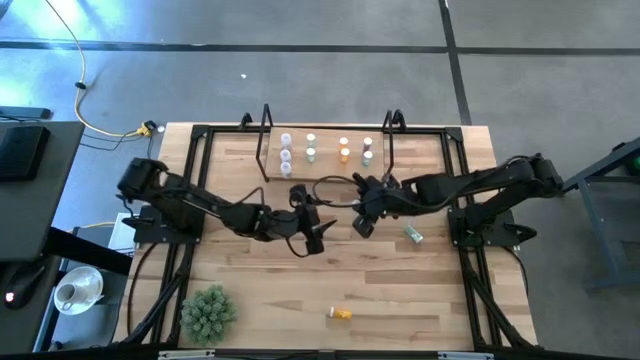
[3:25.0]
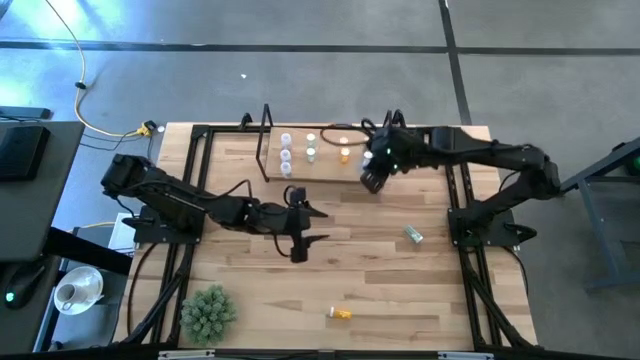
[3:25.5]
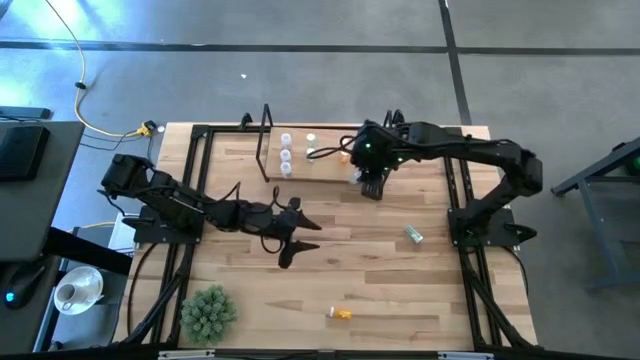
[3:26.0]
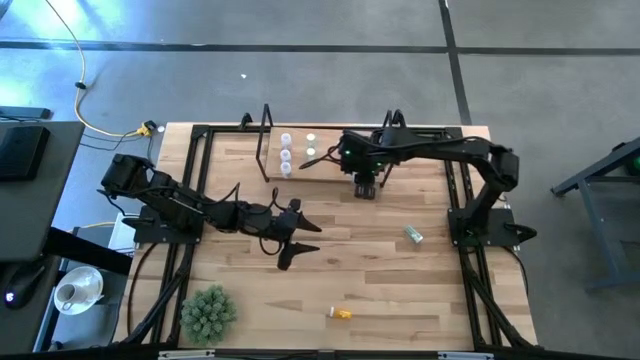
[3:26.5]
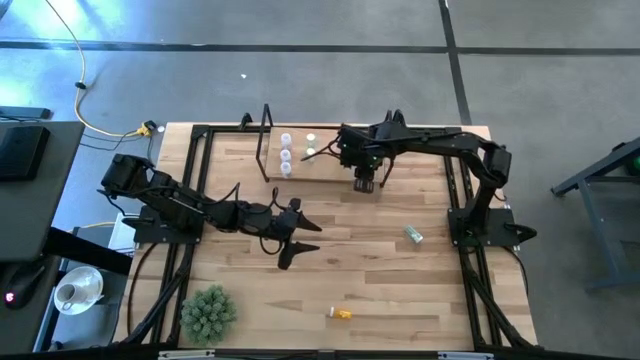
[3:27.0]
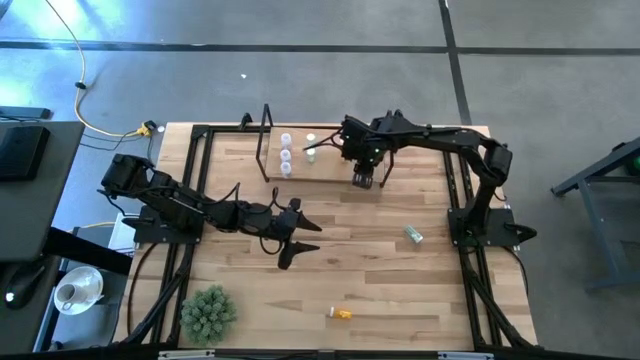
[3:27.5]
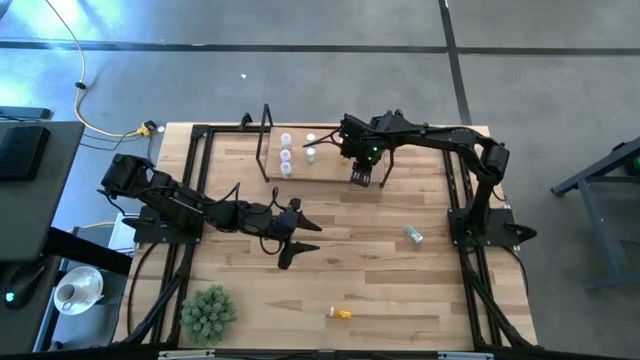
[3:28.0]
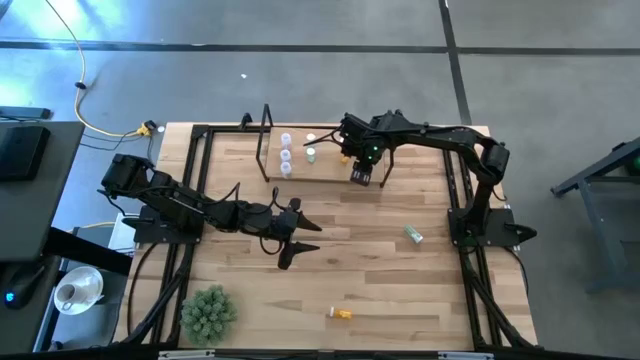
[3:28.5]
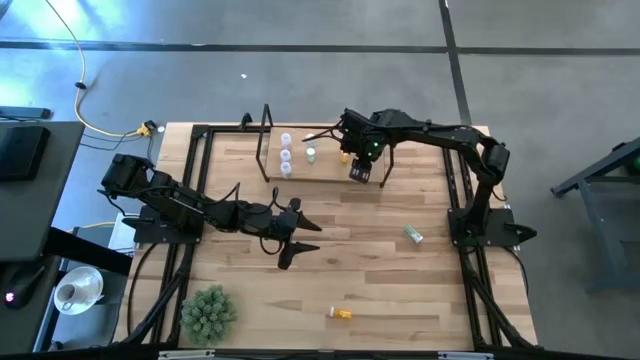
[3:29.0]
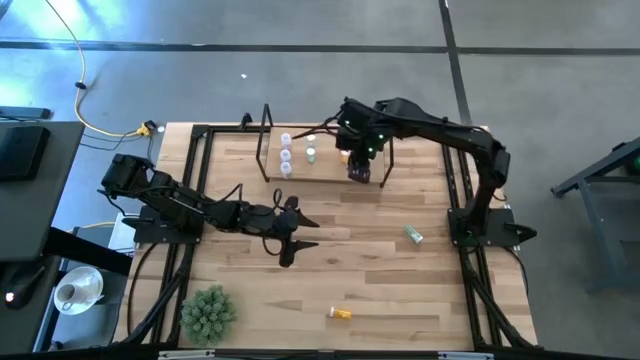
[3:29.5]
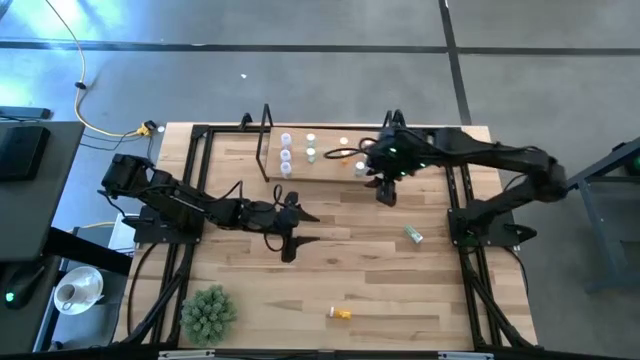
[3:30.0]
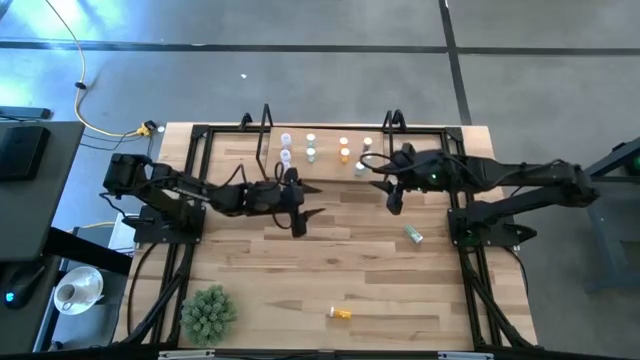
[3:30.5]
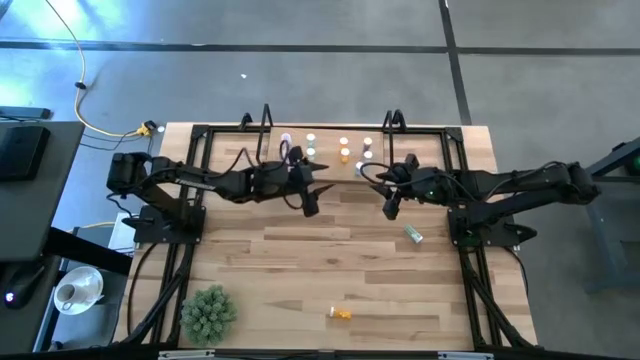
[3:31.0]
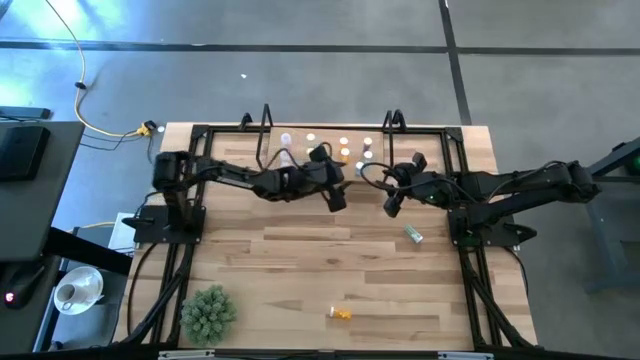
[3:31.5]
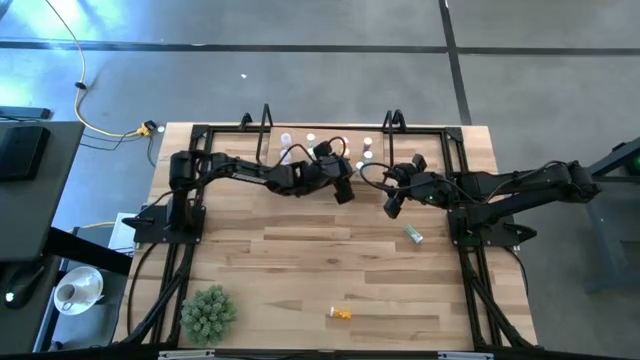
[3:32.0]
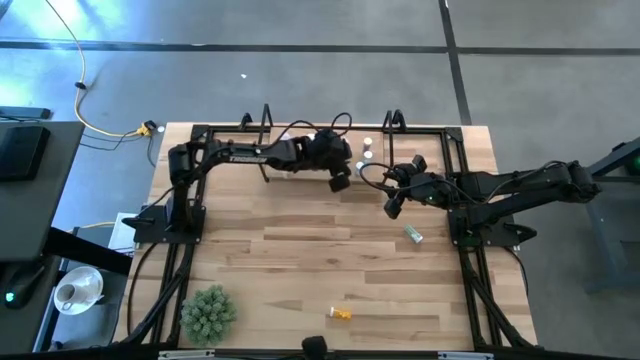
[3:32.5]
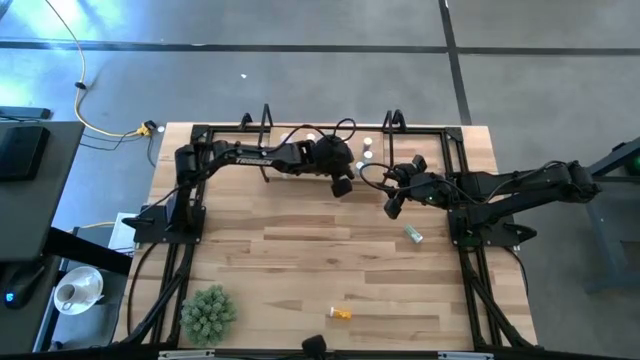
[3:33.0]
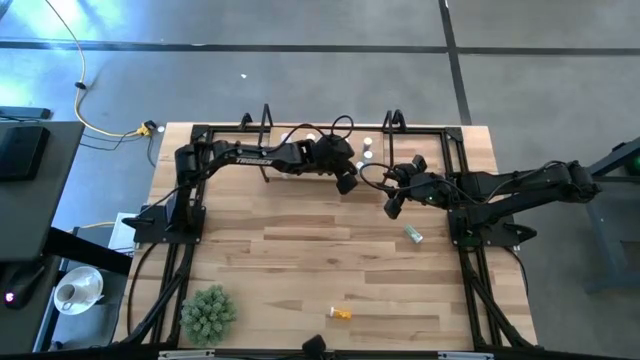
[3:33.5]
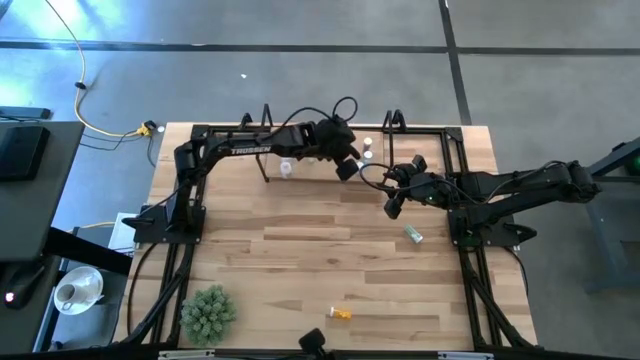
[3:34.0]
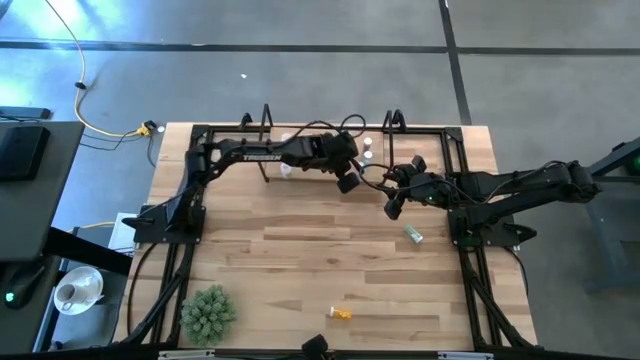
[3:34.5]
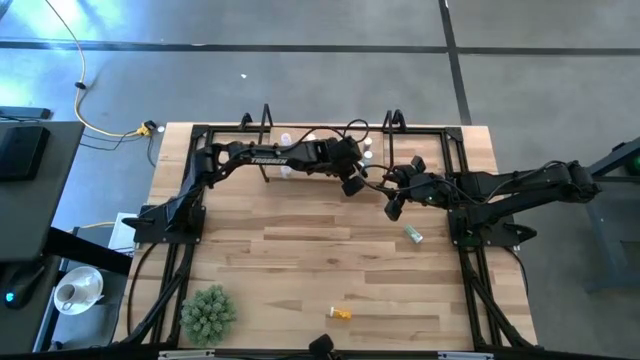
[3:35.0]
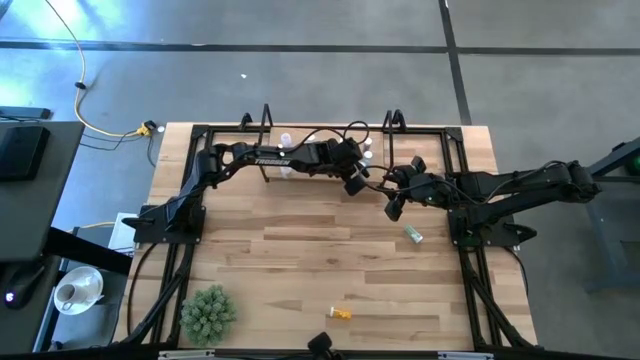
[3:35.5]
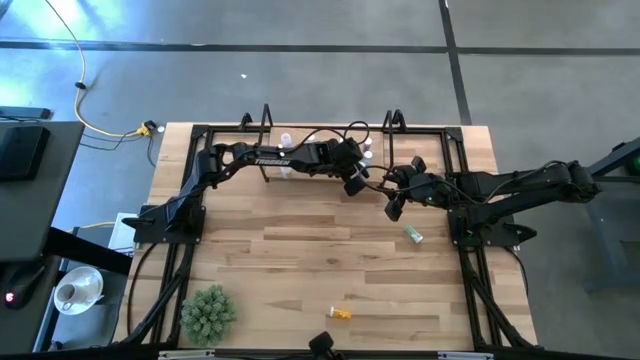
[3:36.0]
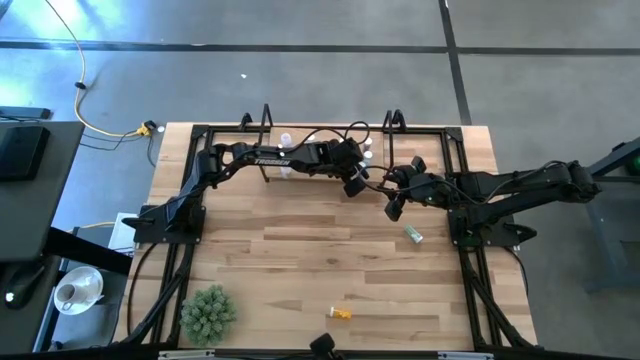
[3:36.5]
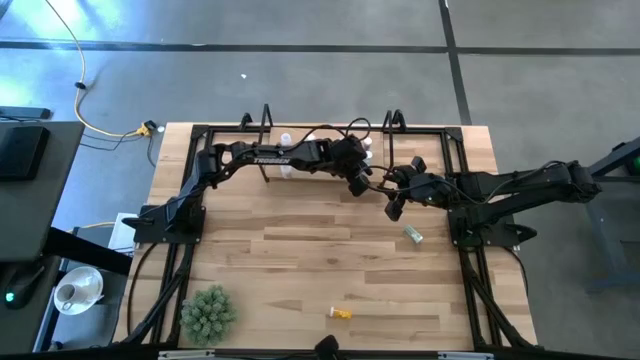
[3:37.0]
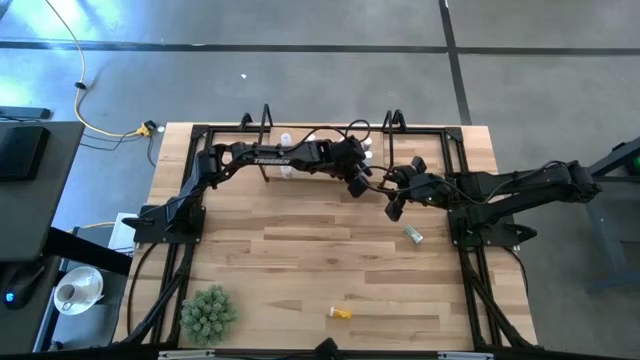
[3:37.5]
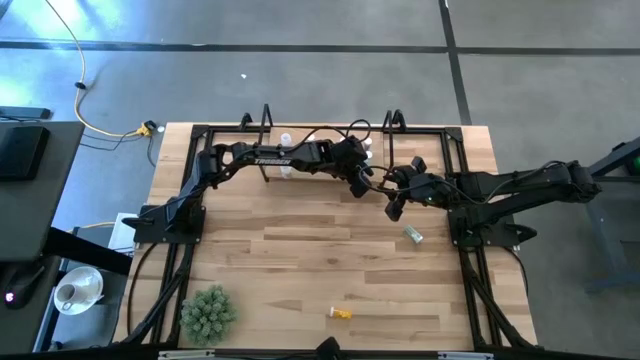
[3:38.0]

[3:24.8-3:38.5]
Task: Pick and place medicine bottles onto shelf by color
Put the blue pill bottle on the shelf aligned with the other blue pill bottles

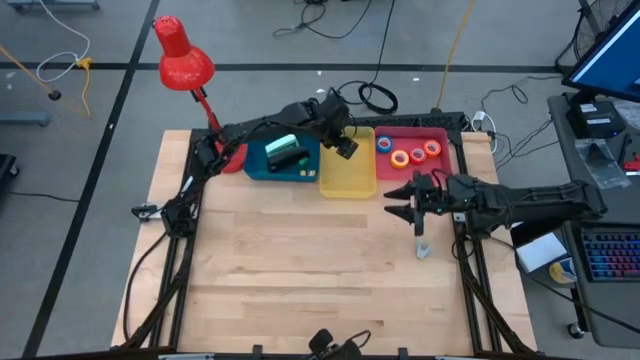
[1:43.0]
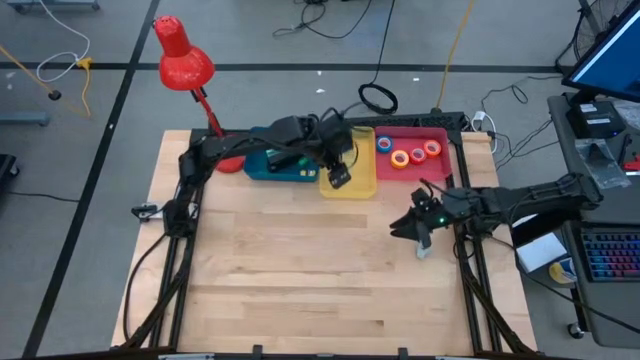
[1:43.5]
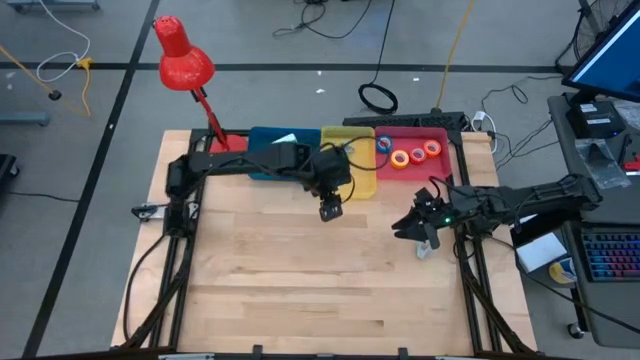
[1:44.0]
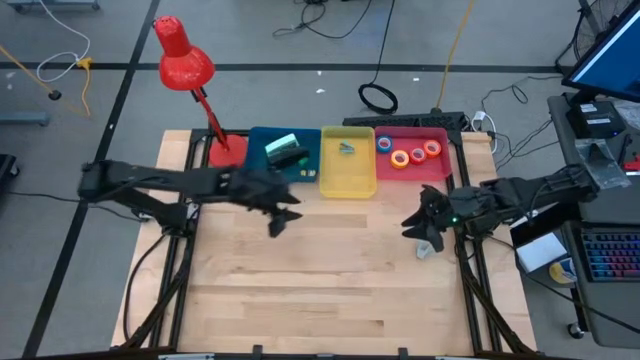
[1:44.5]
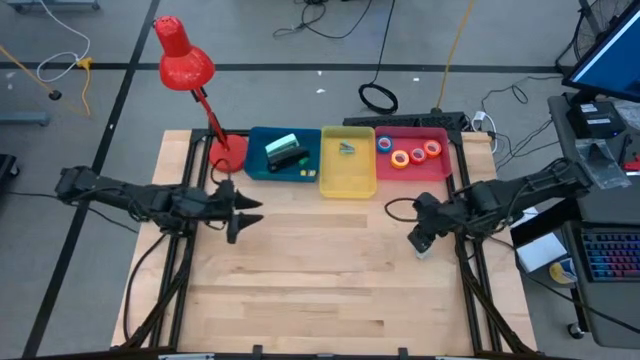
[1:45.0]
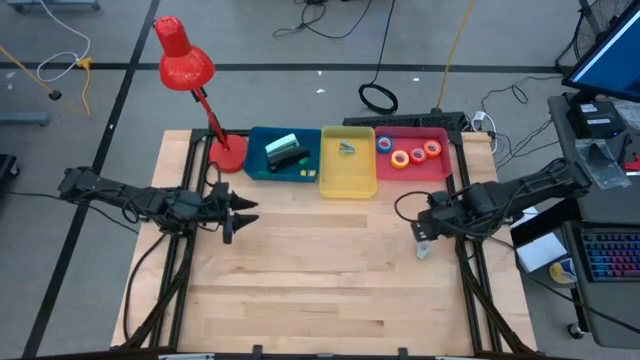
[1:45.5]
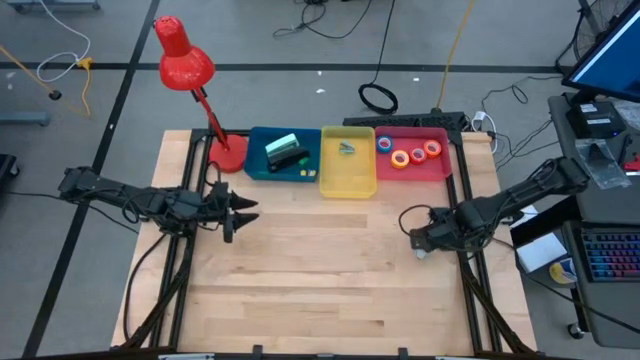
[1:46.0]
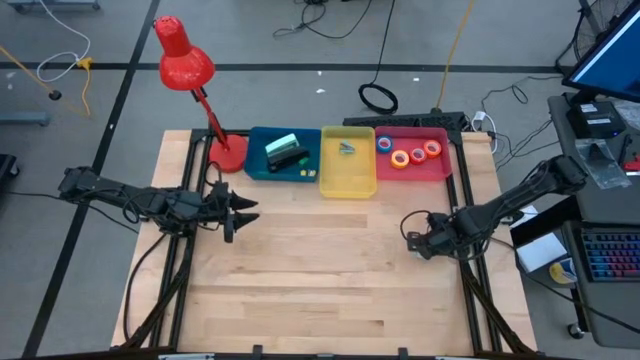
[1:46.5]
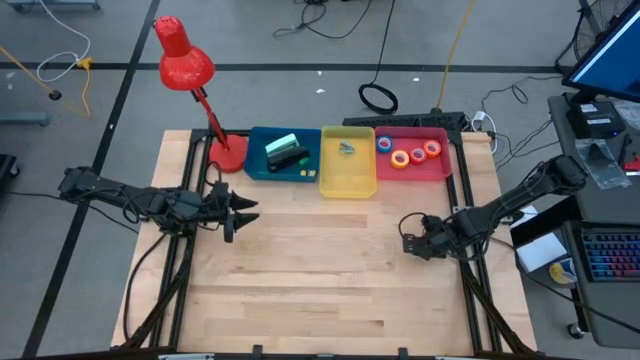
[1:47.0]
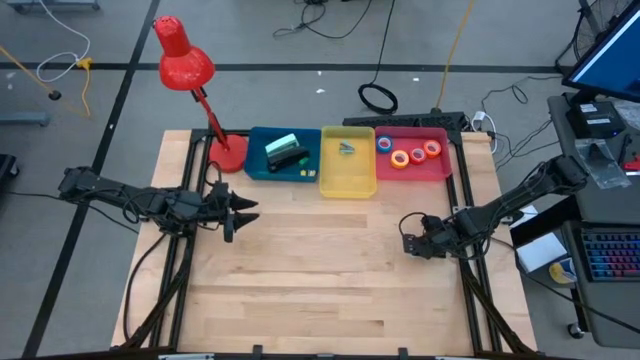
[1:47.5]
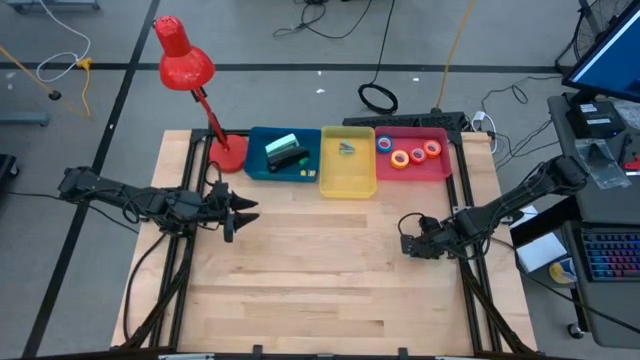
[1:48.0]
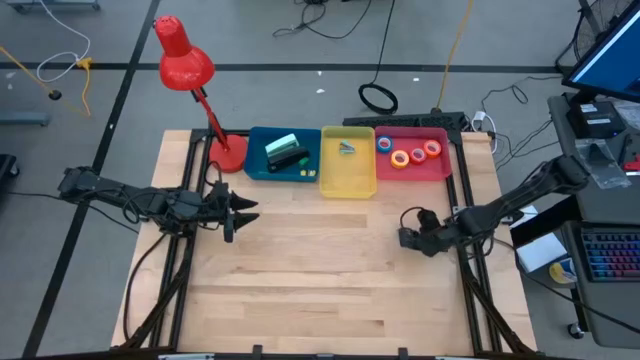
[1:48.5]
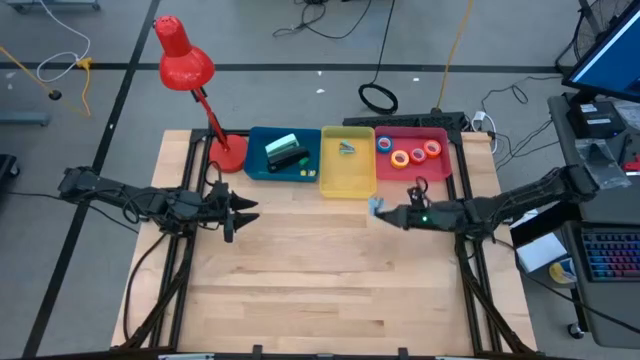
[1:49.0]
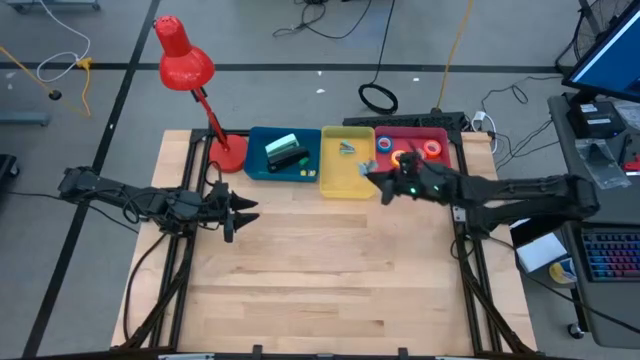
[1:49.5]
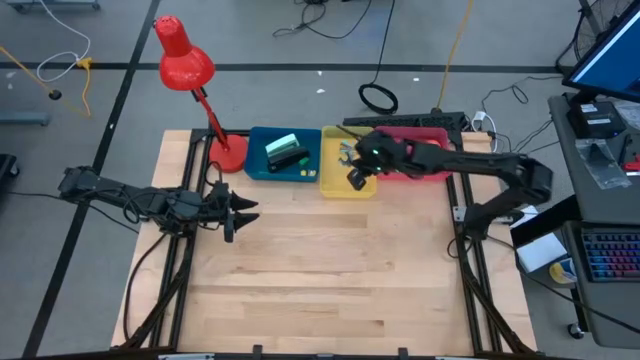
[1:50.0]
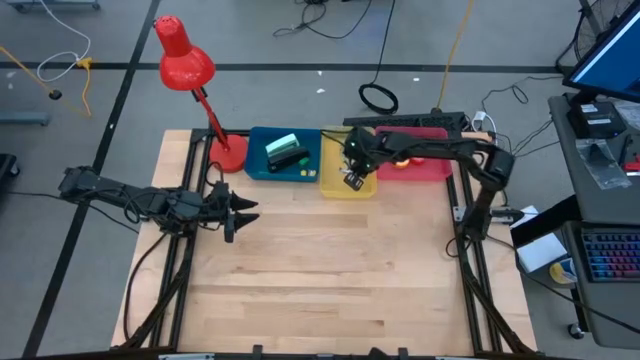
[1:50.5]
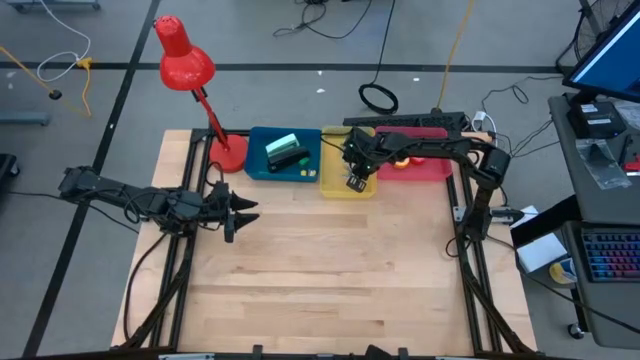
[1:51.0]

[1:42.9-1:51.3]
Task: Pick and place Stapler, Stapler remover, tape
Put the light blue staple remover into the yellow bin
